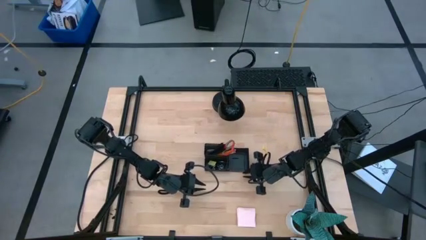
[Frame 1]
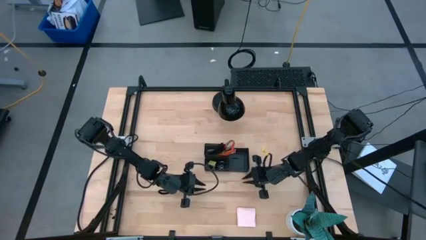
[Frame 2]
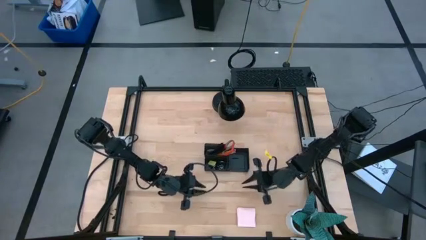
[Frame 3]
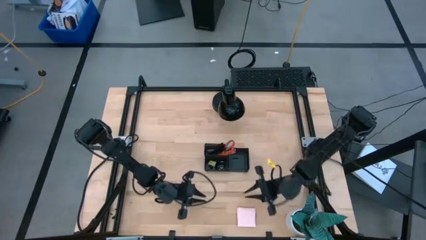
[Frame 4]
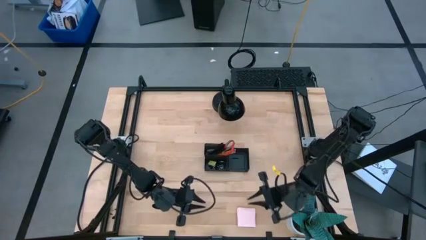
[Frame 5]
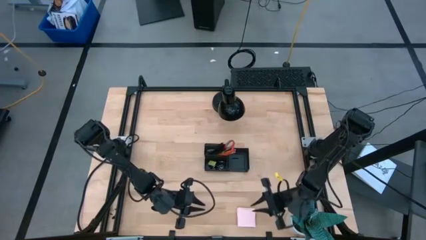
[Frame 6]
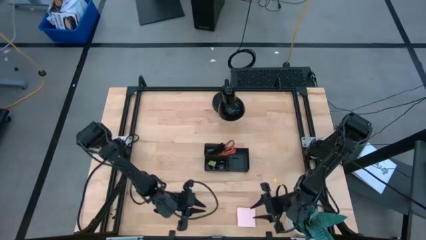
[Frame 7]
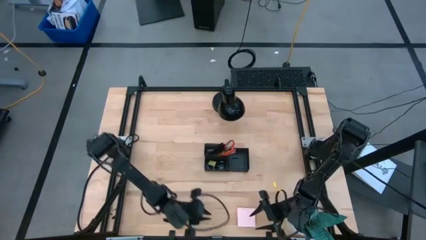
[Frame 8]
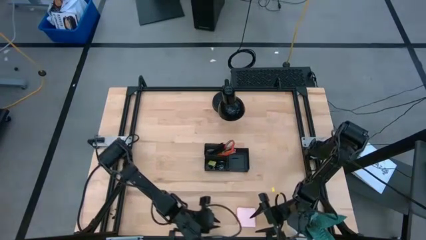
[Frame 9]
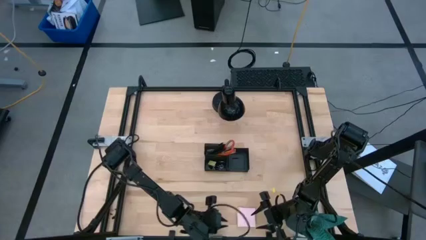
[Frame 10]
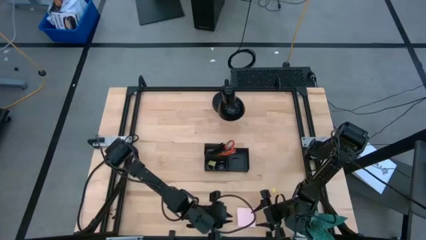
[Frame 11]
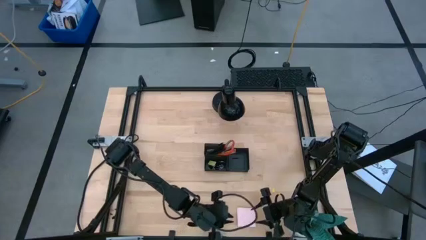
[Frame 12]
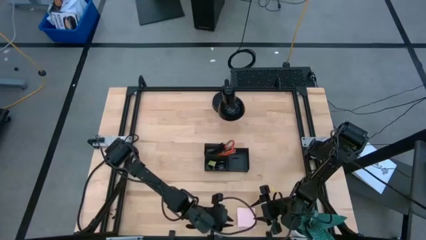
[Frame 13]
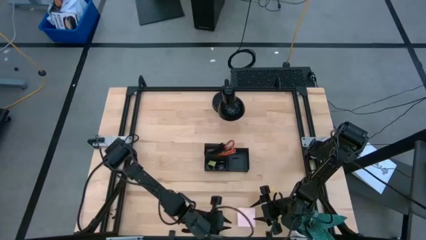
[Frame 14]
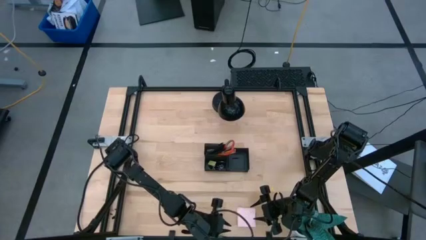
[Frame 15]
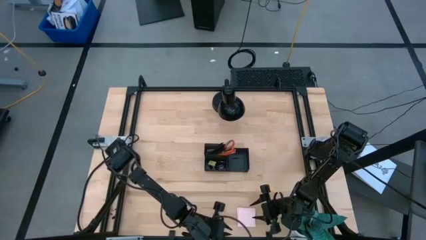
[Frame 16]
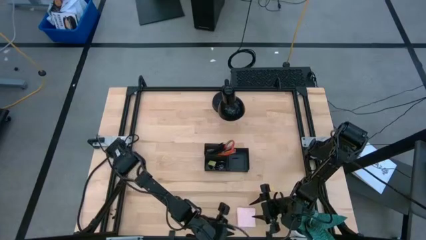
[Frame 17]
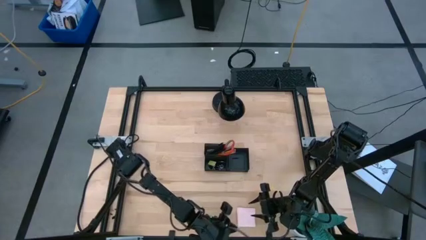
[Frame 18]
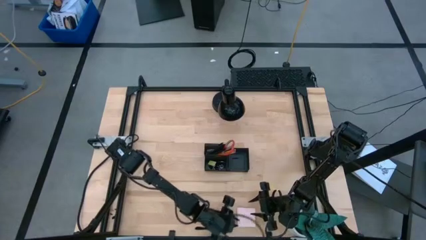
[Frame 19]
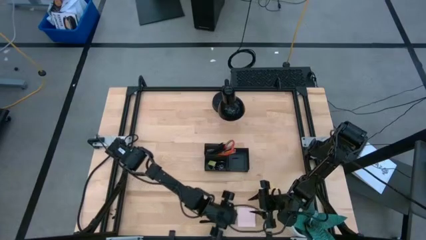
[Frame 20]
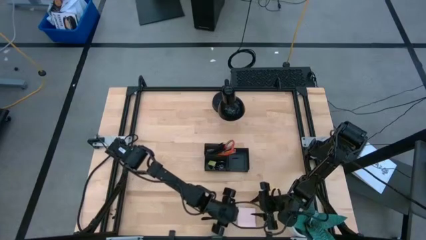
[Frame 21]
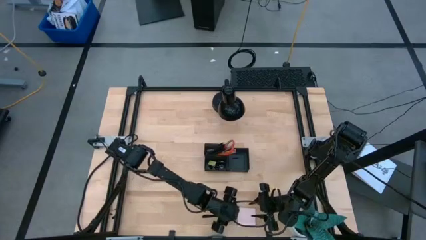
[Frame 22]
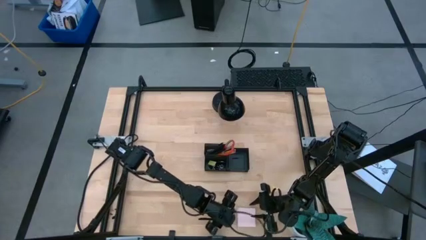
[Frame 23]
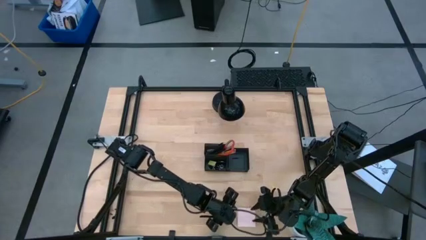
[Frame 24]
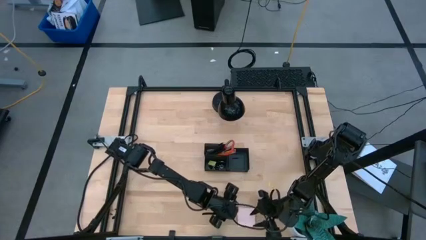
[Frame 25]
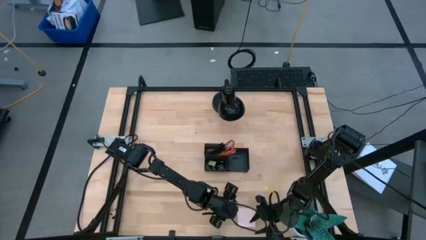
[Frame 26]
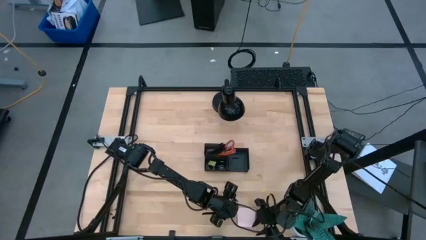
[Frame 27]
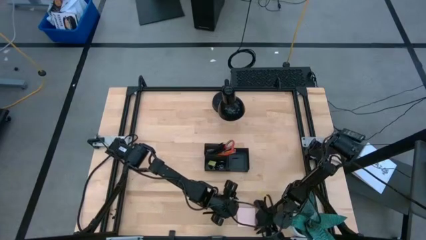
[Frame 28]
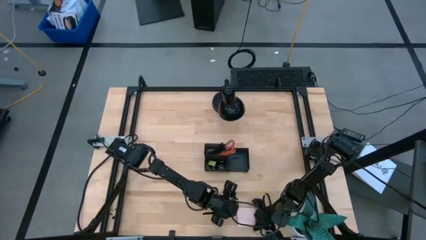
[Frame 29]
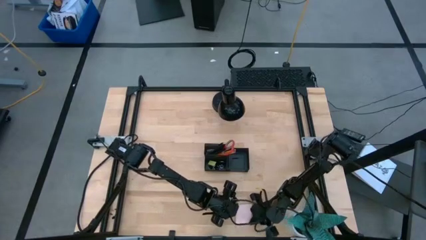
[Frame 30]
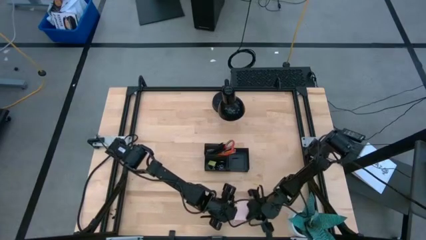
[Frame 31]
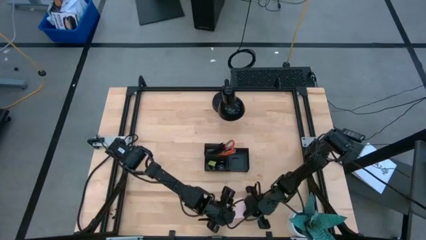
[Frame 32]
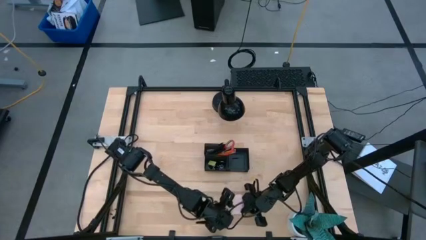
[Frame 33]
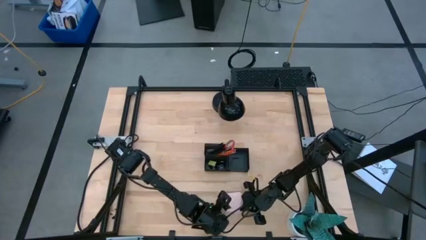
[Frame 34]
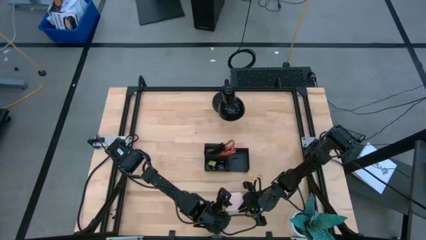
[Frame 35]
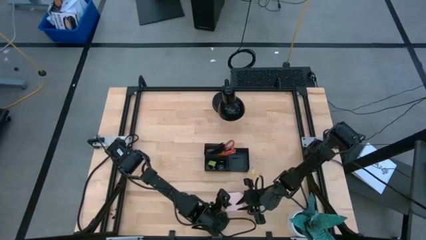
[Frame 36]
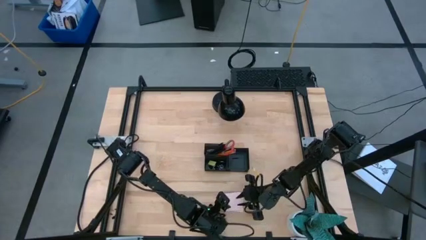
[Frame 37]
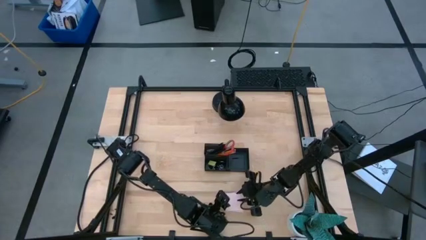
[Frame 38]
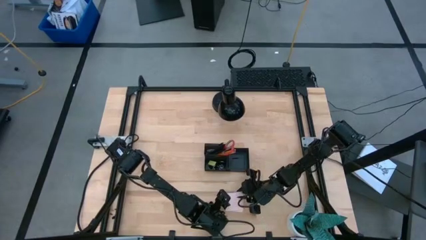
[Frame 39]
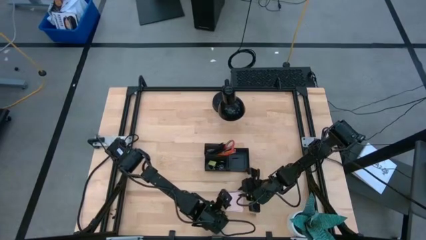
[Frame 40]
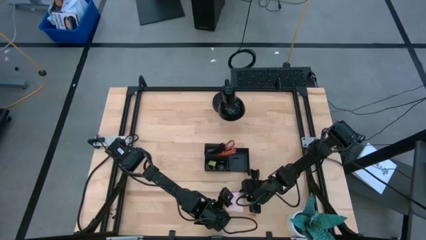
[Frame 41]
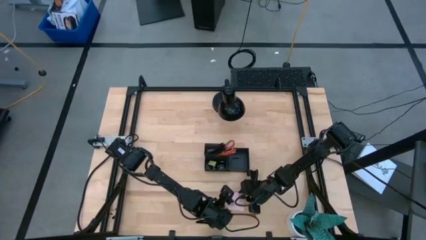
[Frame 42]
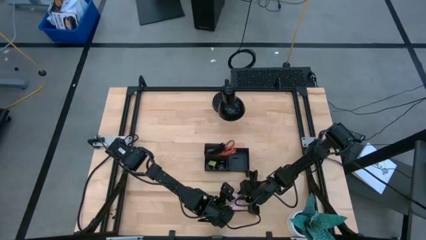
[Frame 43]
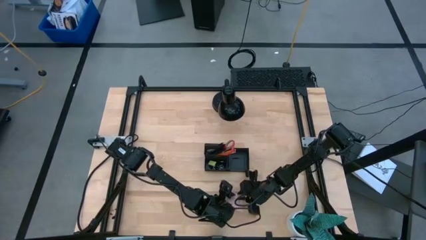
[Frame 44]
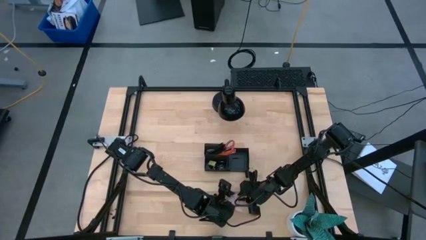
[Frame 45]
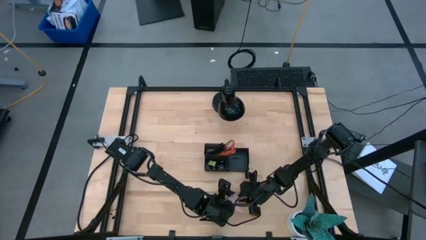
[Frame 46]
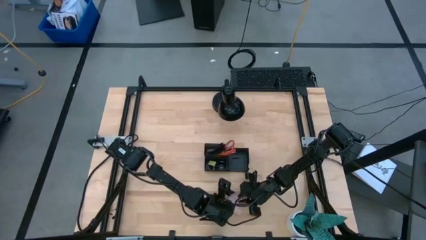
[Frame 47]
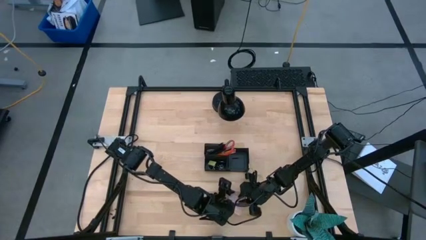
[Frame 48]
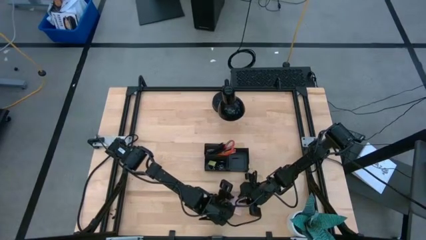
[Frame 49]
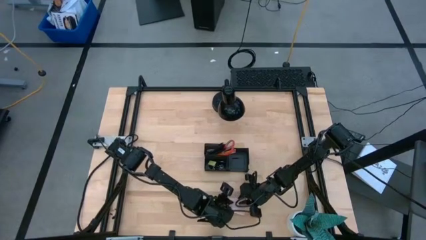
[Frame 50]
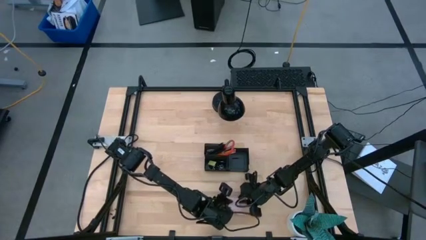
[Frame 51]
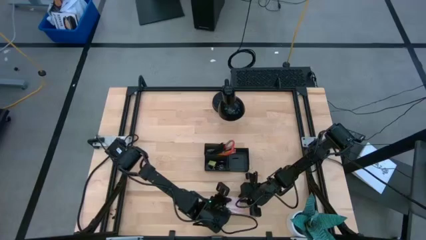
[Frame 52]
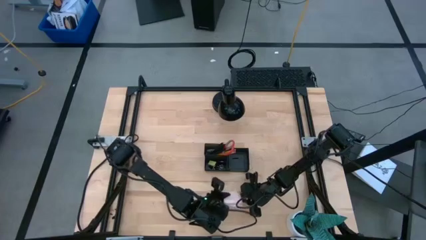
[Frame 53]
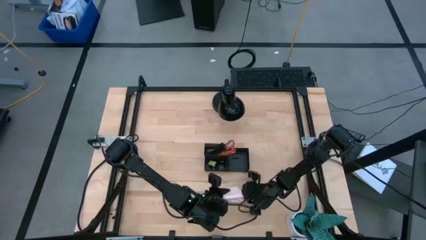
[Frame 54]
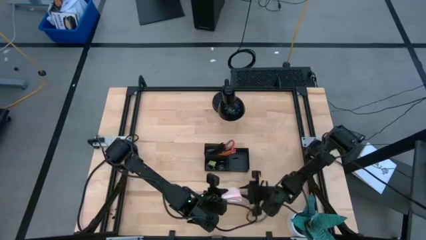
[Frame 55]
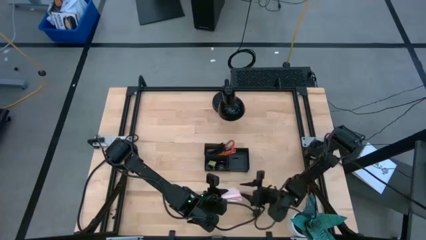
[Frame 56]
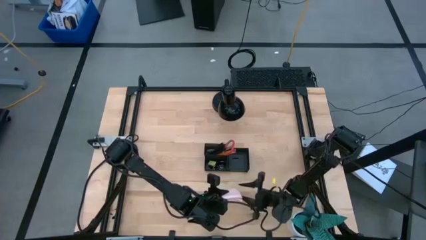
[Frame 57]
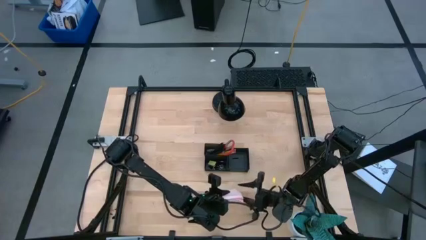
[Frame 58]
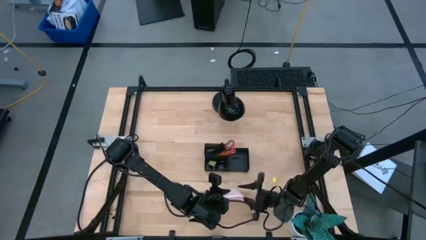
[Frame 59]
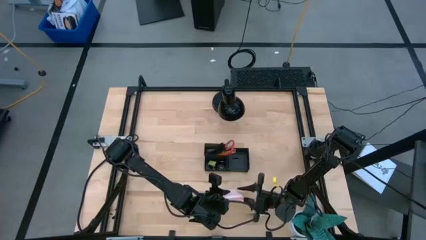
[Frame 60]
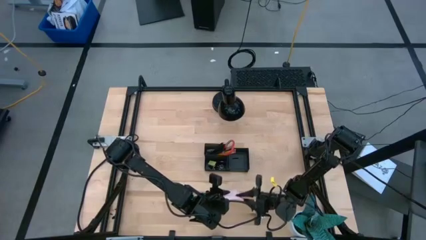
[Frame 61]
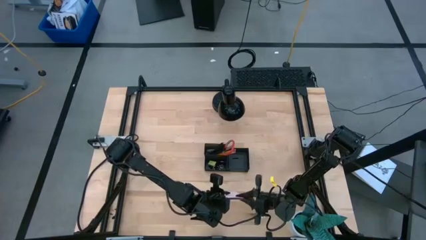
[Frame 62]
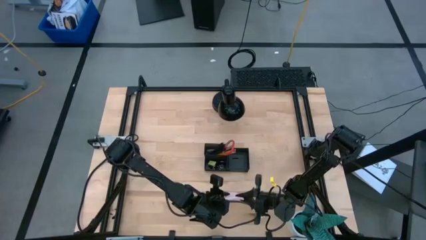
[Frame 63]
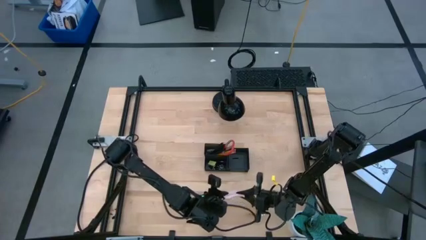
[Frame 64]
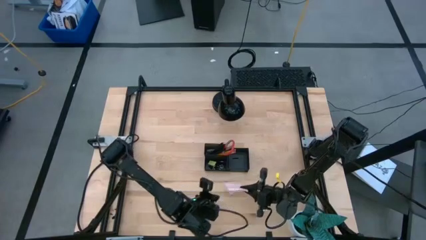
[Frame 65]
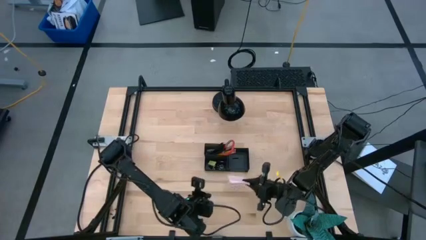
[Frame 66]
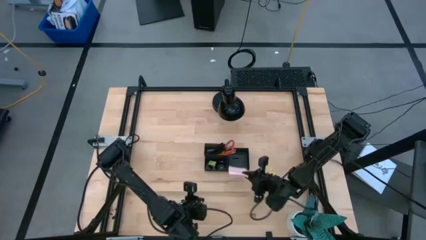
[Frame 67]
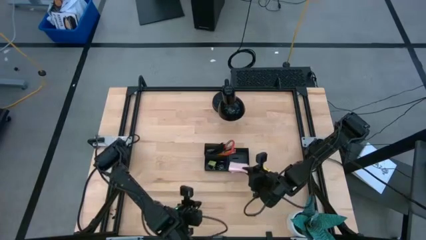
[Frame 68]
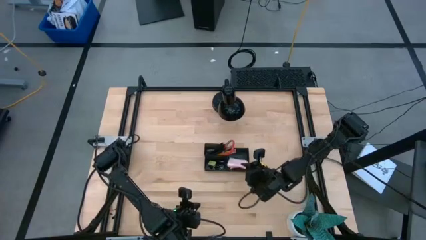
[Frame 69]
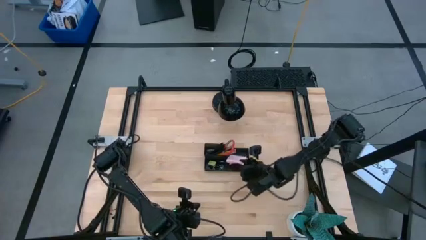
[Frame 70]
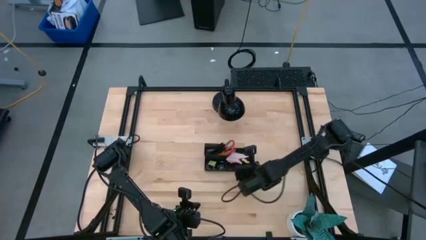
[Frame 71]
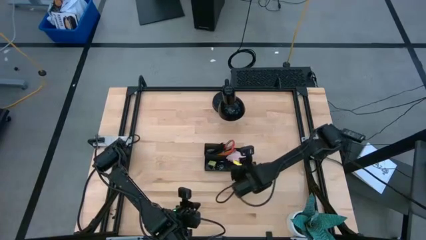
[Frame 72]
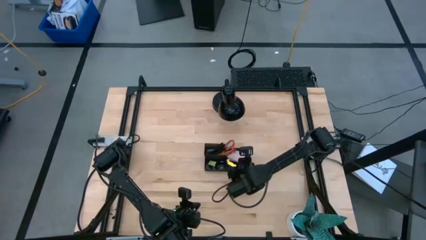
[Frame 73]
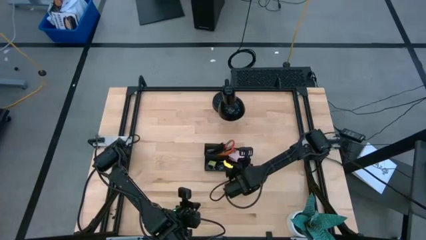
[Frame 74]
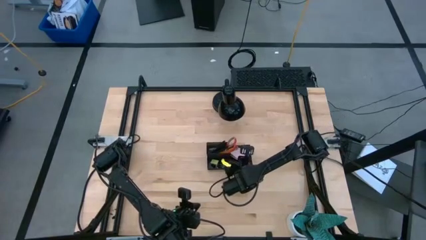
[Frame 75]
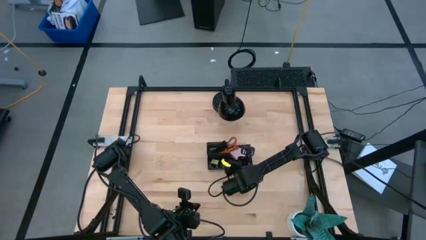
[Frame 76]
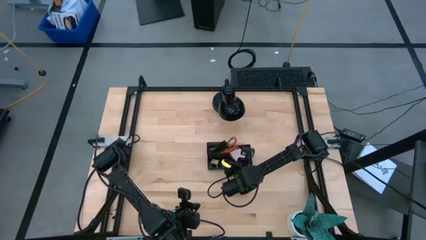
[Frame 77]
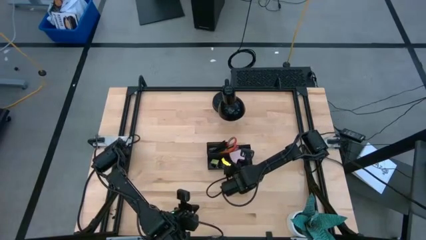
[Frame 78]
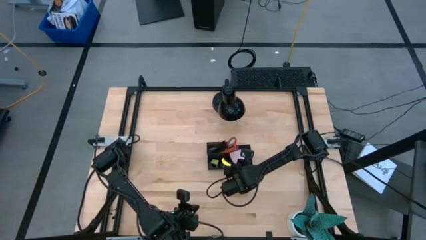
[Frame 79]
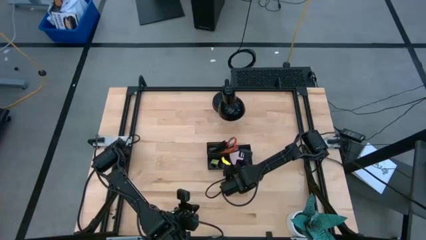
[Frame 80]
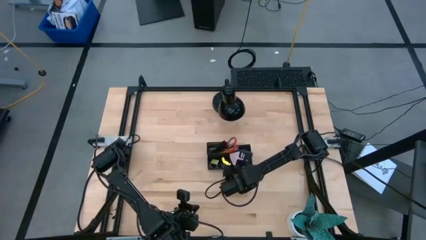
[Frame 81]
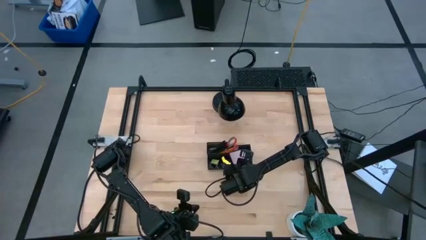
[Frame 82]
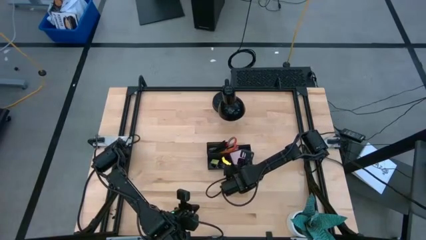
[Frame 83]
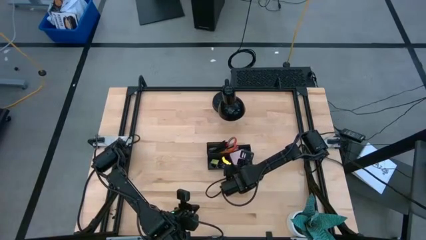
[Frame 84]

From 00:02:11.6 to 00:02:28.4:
Task: Pick and place office supplies into organizer
Put the pink sticky notes into the black desk organizer
